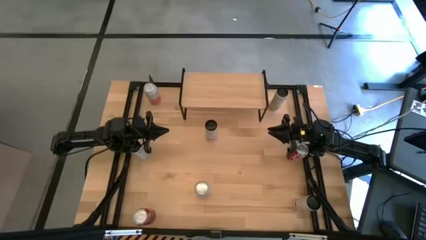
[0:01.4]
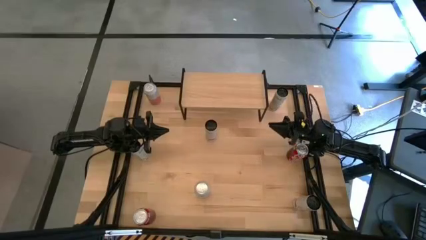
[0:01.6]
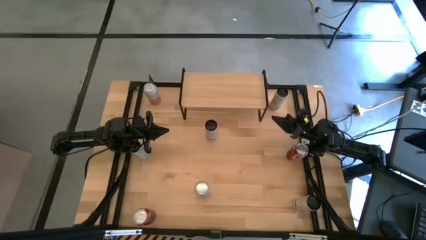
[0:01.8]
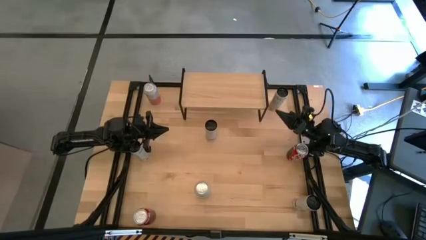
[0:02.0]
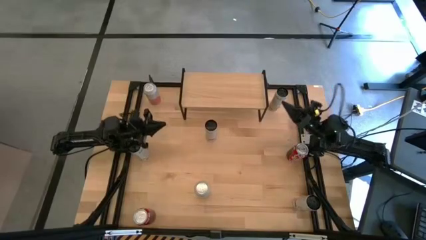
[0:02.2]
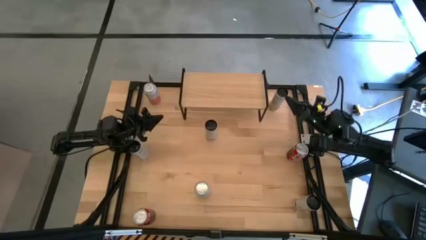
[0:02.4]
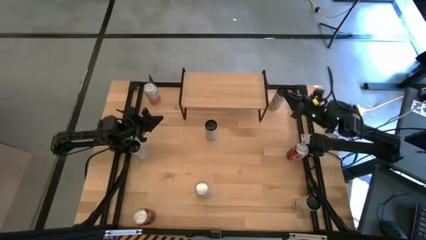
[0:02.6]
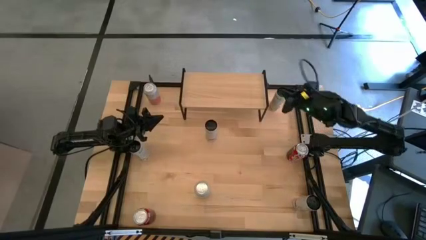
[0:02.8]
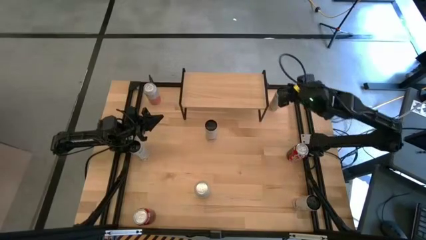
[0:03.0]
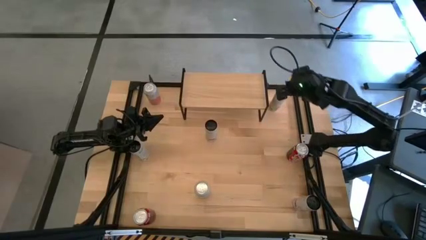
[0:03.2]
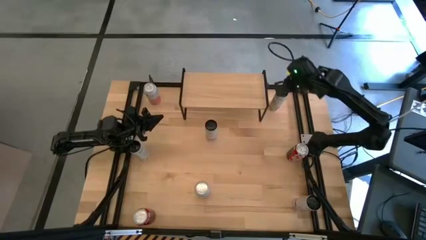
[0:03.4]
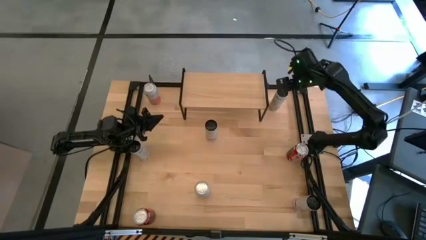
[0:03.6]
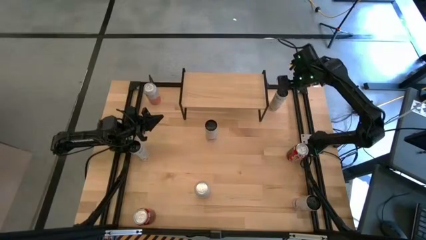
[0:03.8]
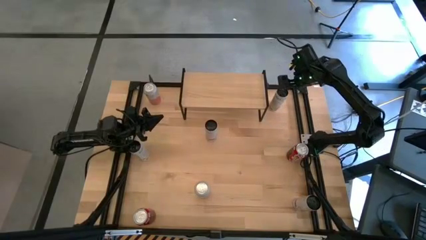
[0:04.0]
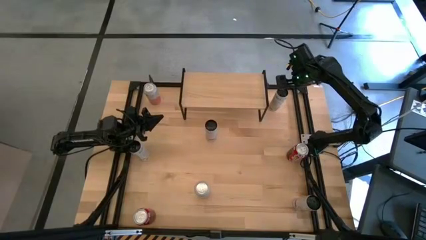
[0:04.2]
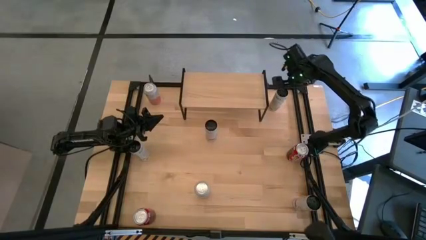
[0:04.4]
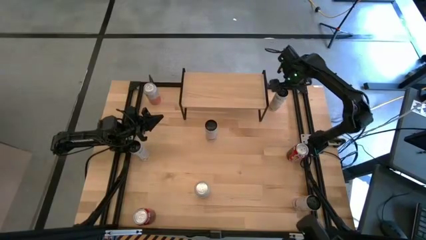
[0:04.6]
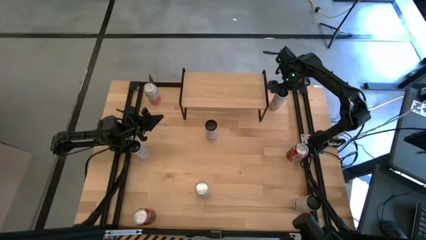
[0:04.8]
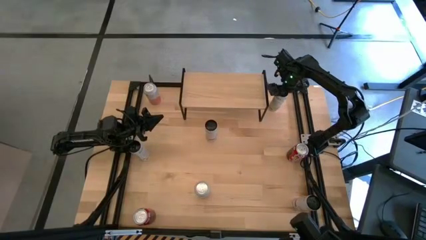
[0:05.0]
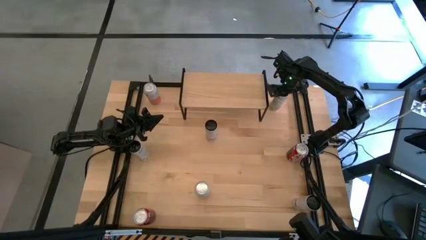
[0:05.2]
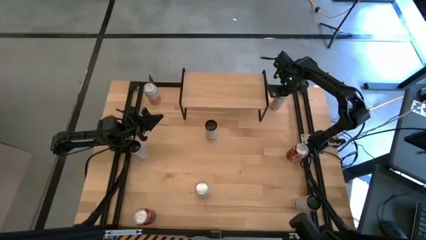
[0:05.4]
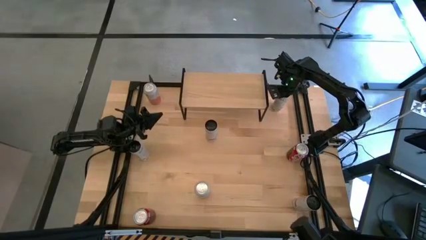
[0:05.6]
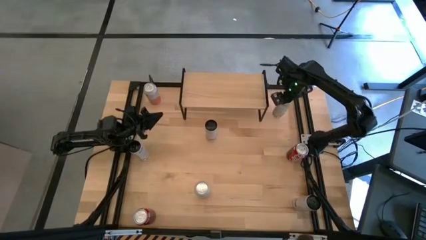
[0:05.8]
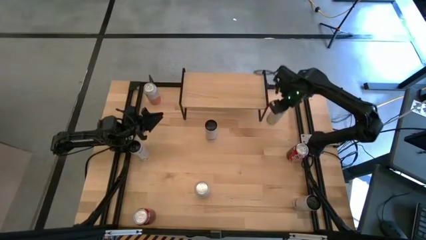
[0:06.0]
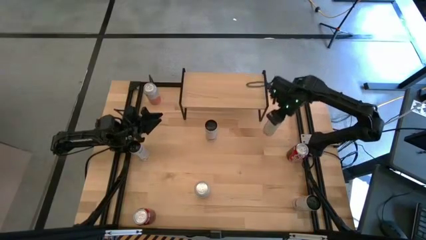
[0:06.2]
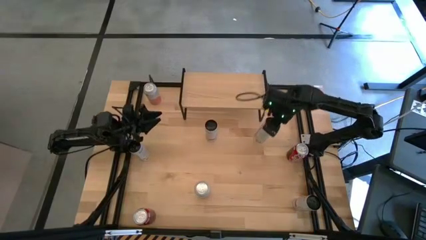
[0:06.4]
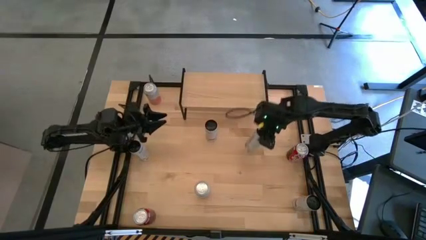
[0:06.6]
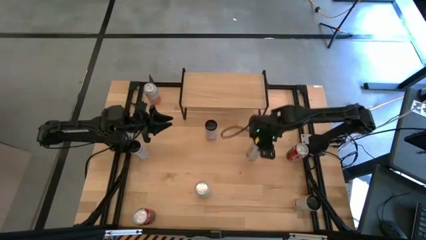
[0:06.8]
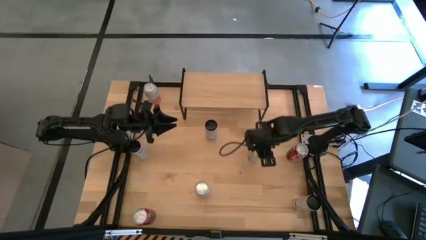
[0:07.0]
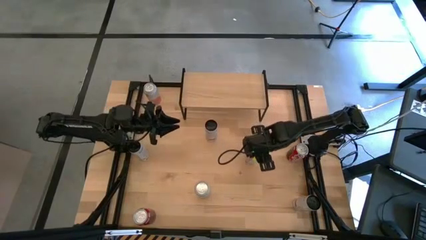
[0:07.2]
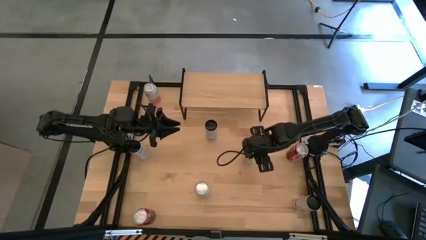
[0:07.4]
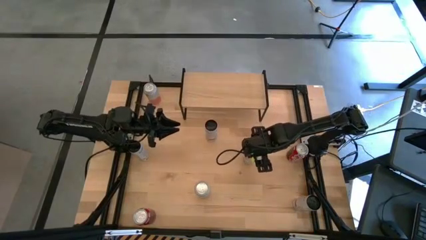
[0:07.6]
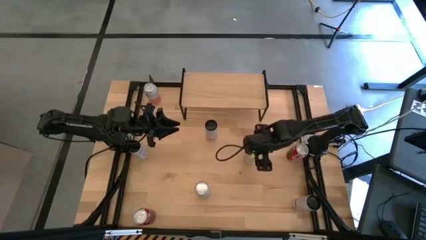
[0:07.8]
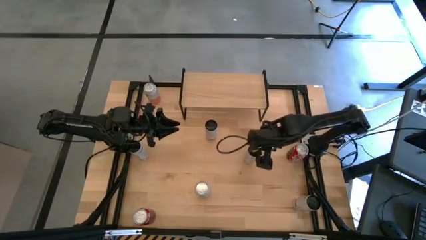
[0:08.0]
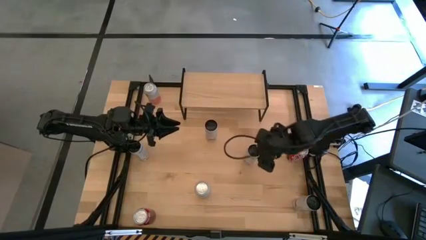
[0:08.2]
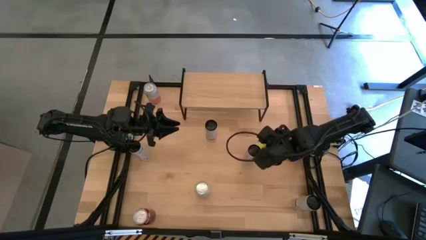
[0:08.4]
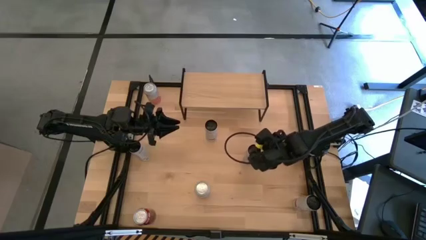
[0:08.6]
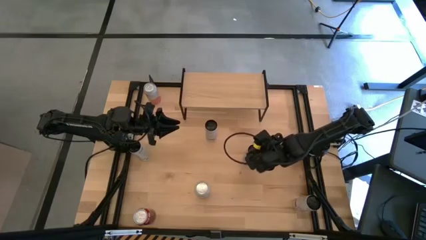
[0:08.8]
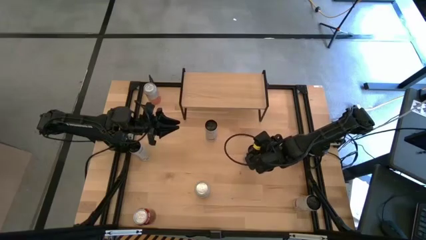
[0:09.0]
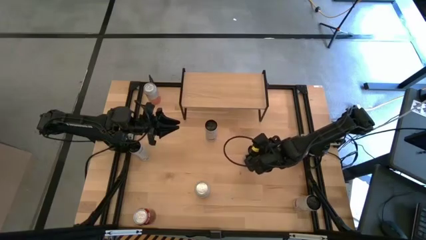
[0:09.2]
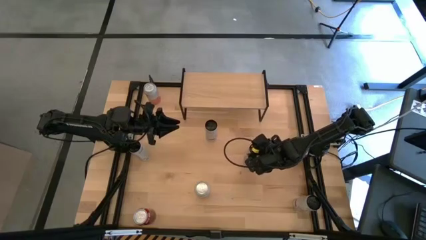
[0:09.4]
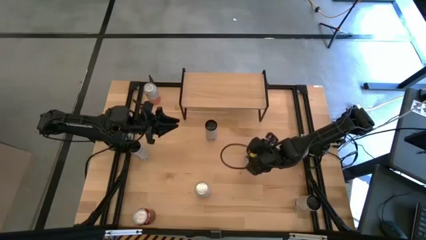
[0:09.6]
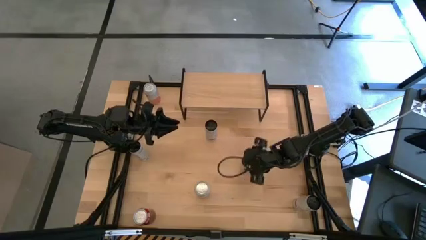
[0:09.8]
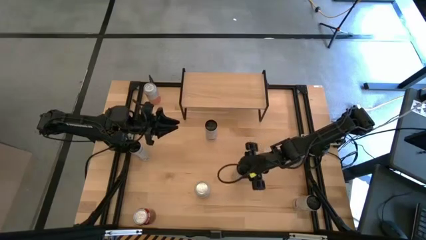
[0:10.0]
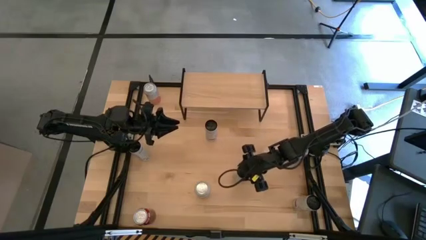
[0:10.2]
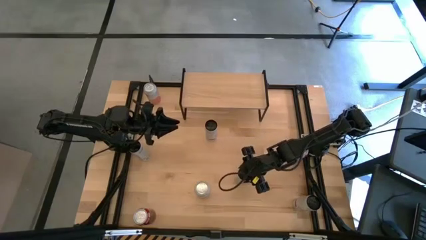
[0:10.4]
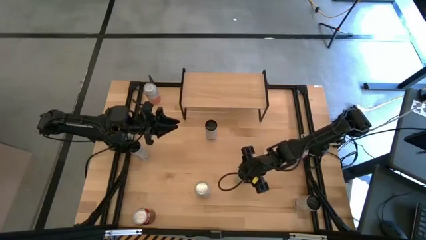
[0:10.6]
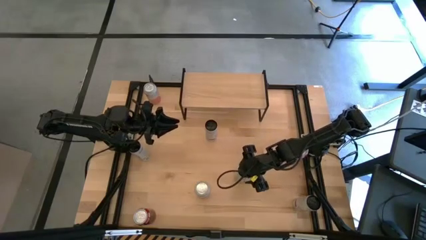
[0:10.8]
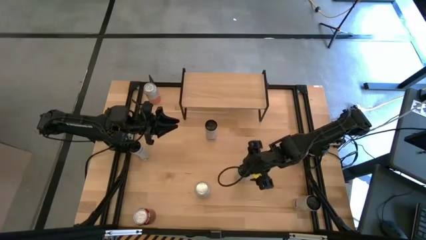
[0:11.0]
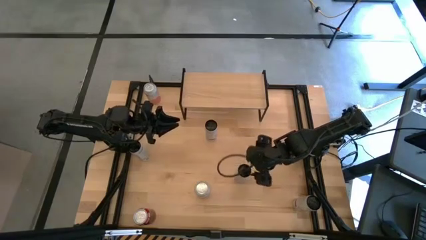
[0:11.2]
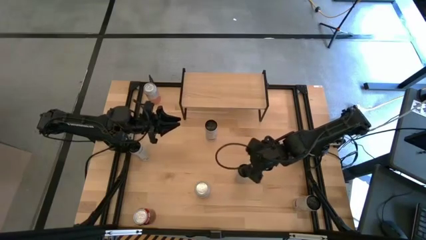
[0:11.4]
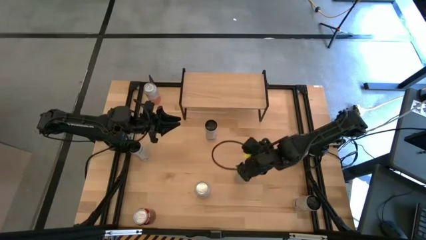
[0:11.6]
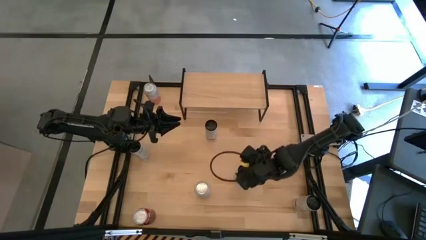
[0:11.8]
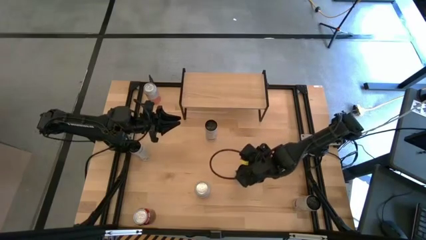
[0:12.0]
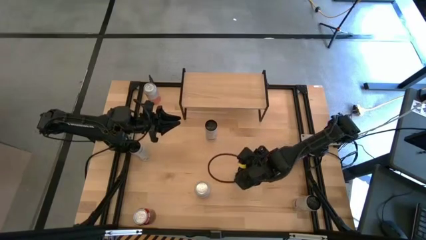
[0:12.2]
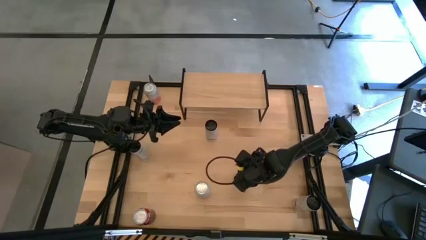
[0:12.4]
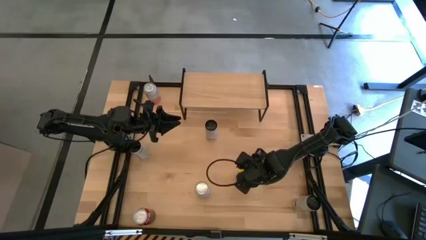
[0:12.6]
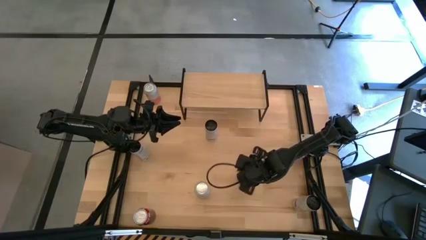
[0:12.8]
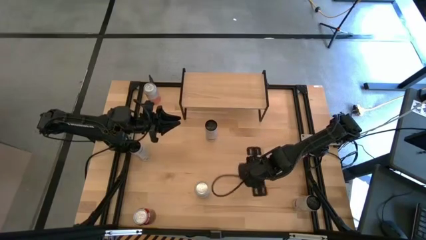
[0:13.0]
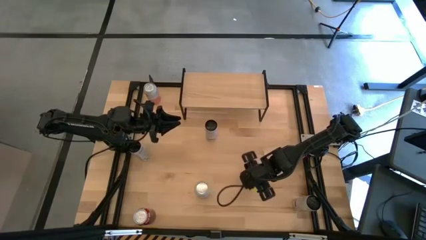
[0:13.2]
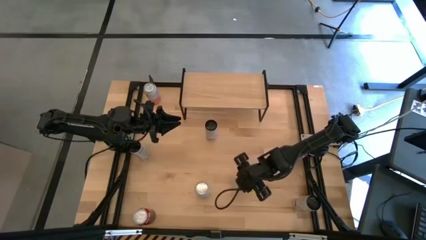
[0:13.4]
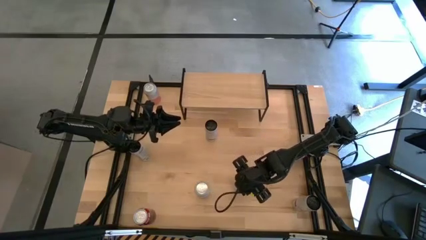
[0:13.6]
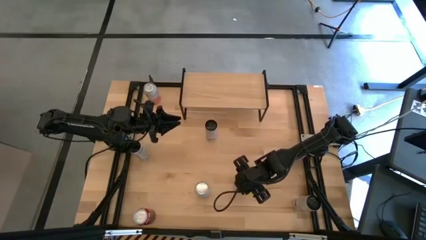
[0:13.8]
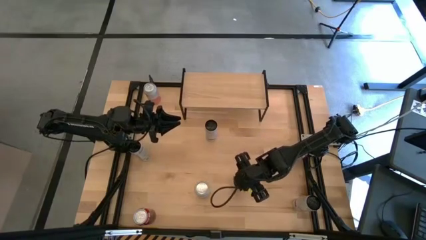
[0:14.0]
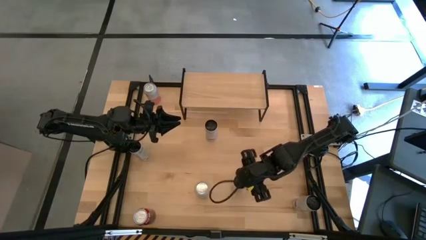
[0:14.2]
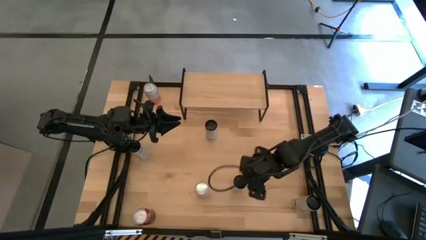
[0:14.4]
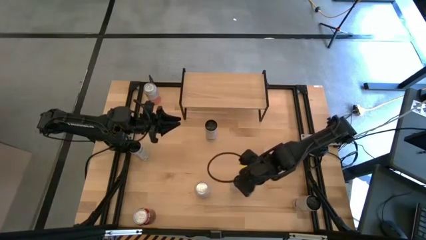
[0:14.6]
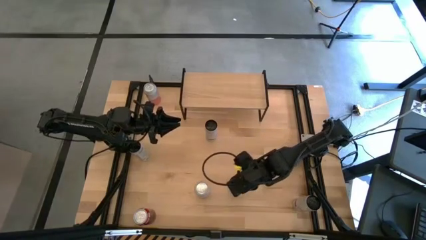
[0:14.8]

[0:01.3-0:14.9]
Task: Place canned beverage on shelf
Put the right white and yellow soda can on the shelf
